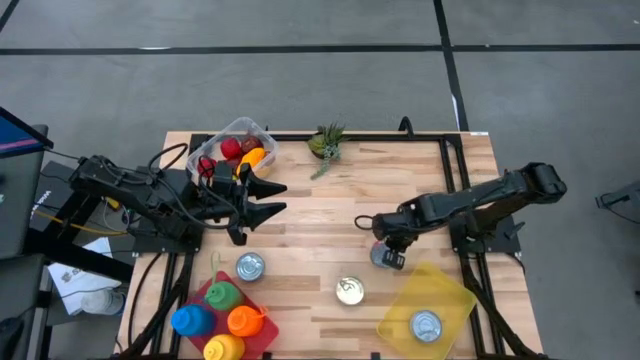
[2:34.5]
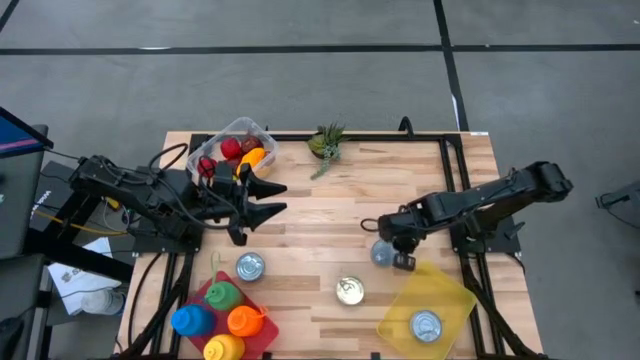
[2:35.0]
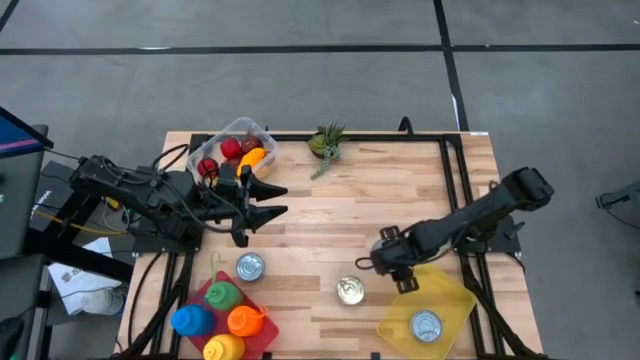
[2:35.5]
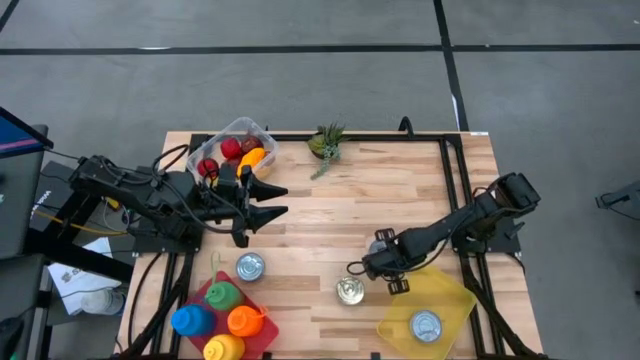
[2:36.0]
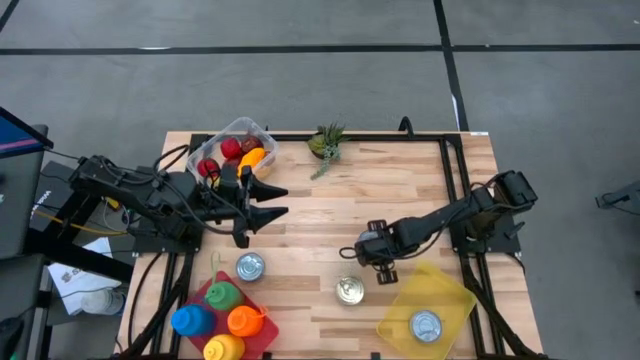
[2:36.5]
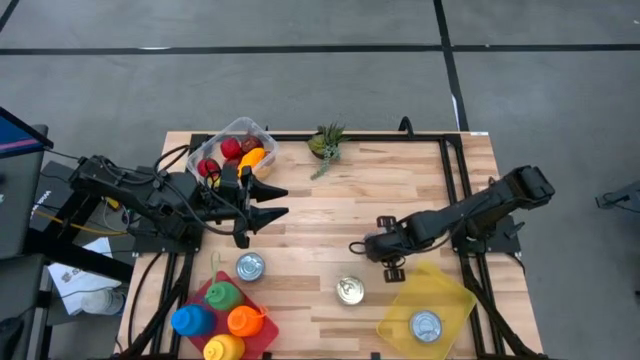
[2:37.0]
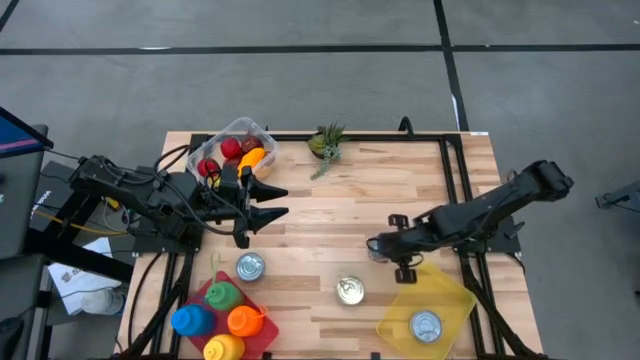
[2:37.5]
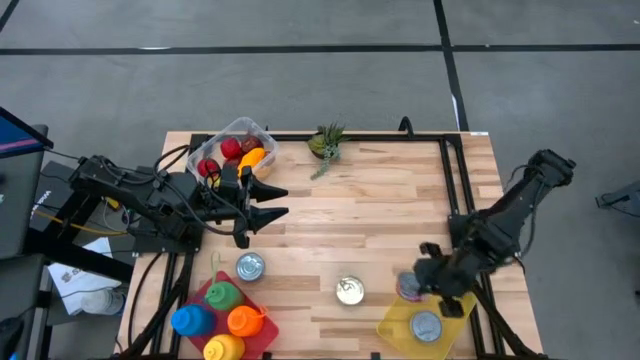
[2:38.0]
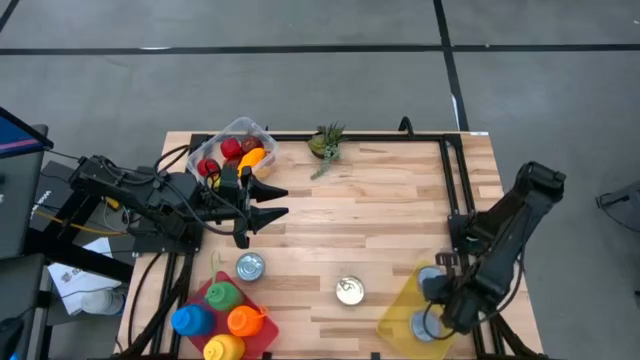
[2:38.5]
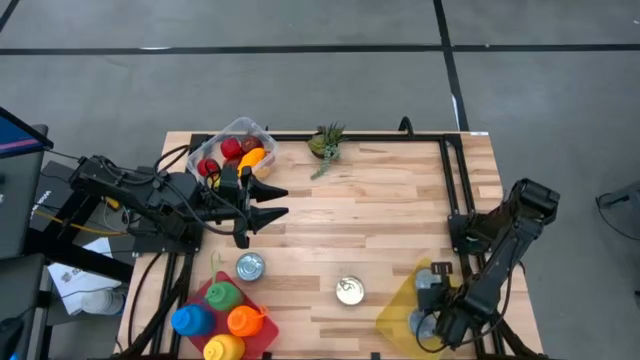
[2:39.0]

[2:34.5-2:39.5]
Task: Pick & Place Food Item
Put the red tuna can into the yellow bin

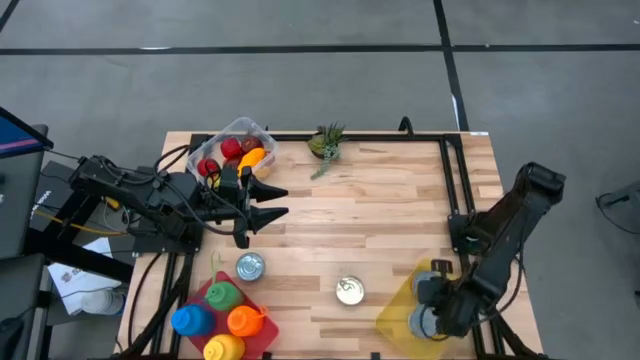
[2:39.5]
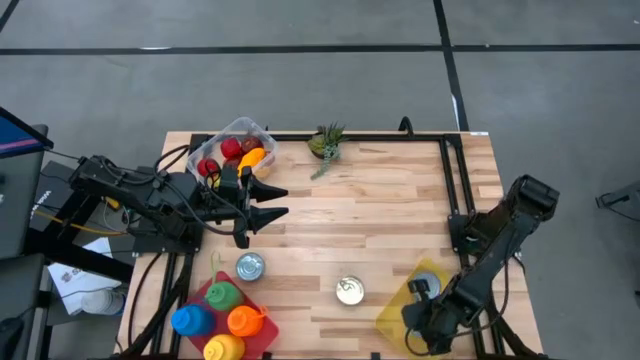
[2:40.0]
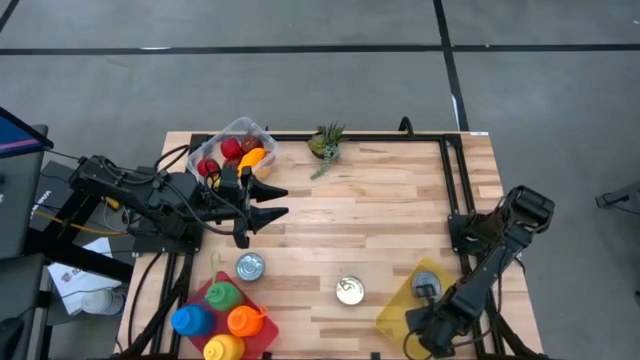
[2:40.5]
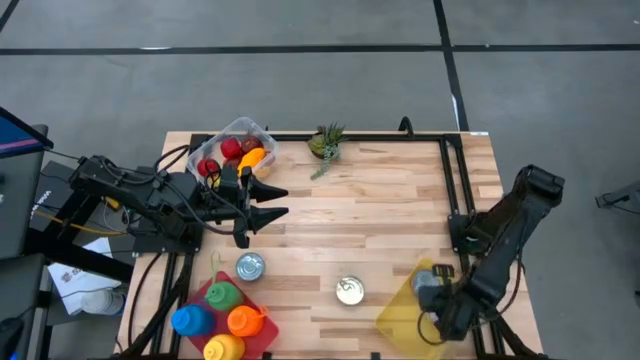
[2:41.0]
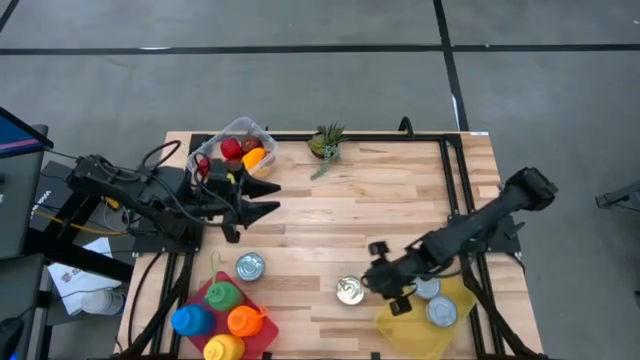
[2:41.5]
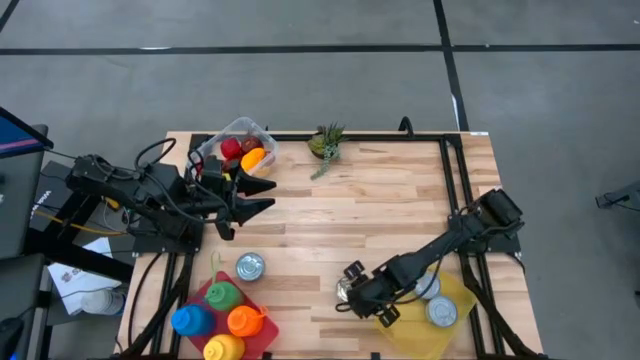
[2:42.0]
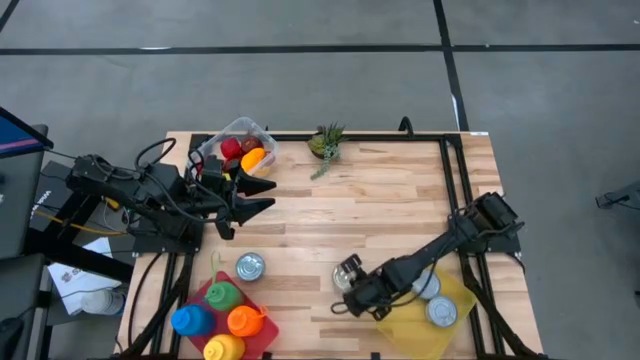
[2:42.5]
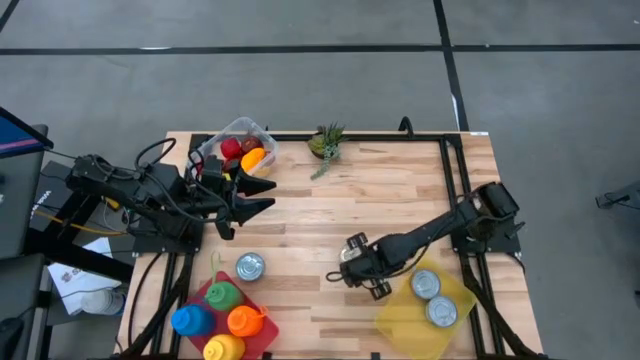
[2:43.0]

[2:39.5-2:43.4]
Put the blue pink tuna can into the yellow bin

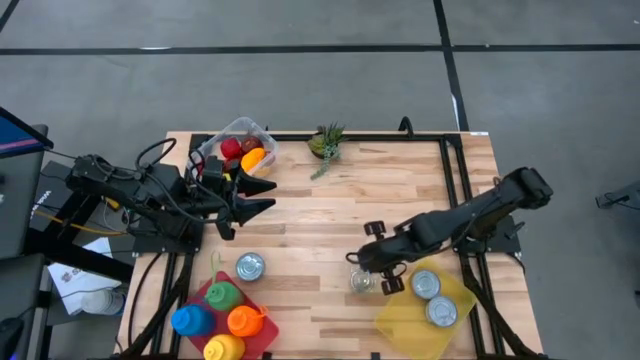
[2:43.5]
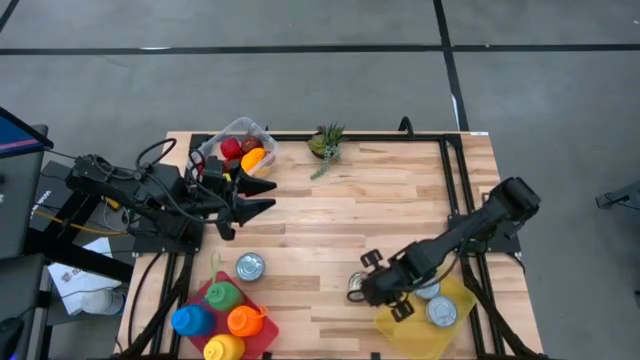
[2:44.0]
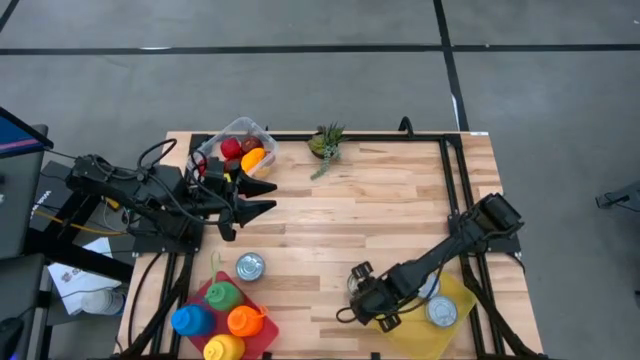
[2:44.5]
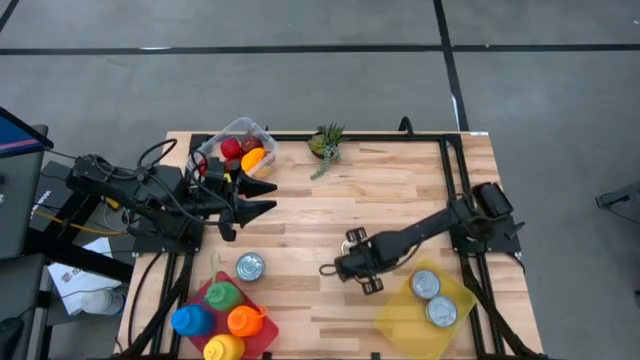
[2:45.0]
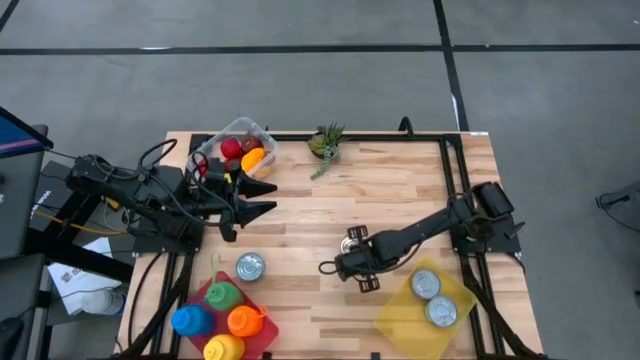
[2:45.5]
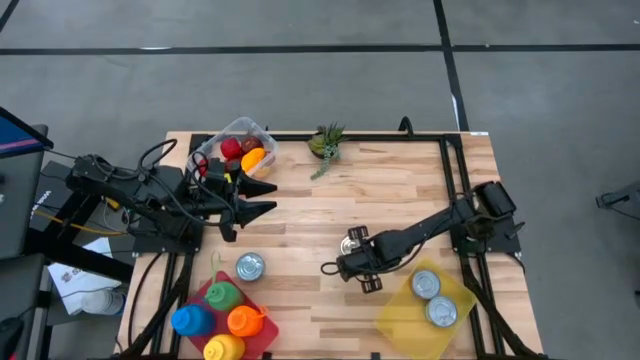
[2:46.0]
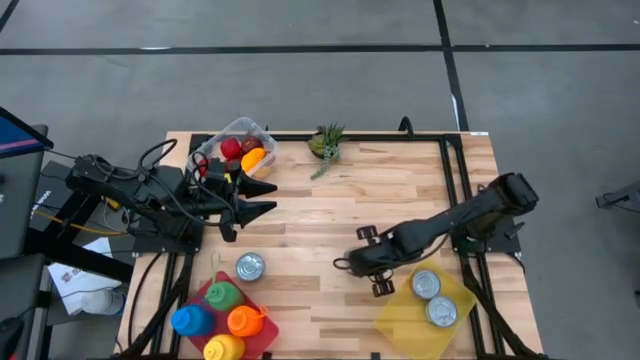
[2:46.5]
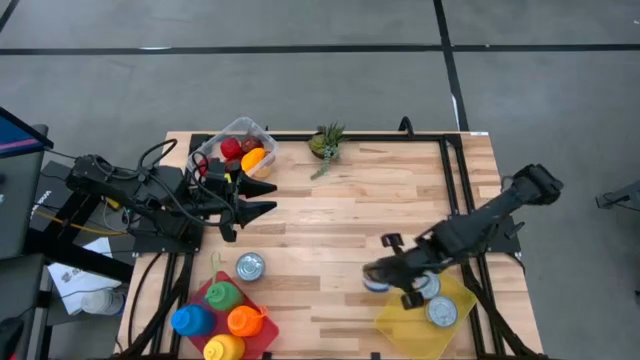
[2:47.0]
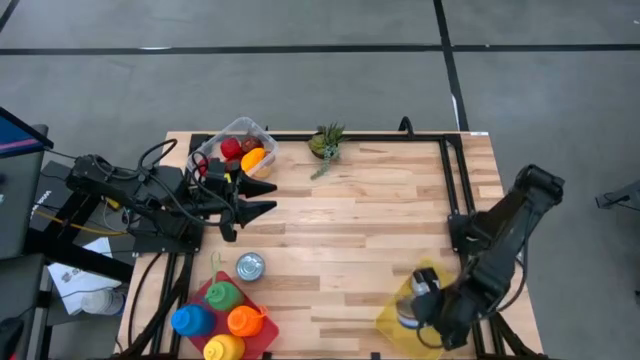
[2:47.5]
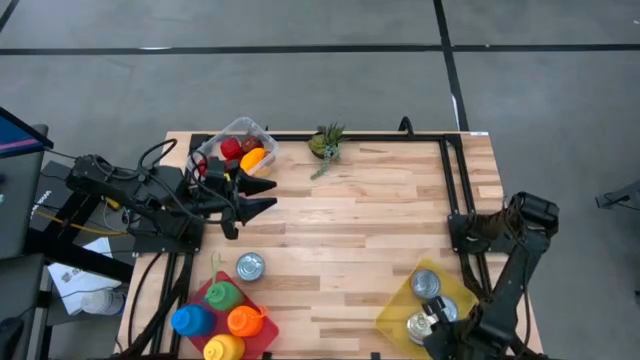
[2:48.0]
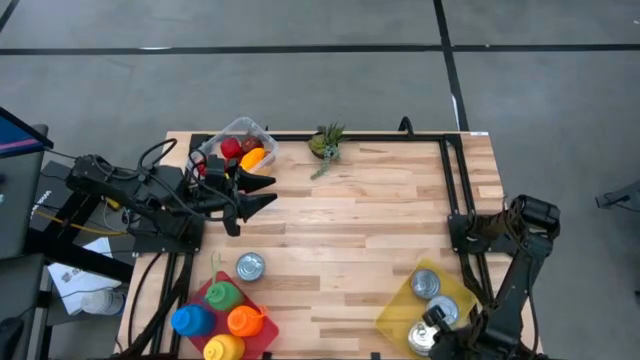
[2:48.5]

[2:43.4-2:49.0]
Put the blue pink tuna can into the yellow bin

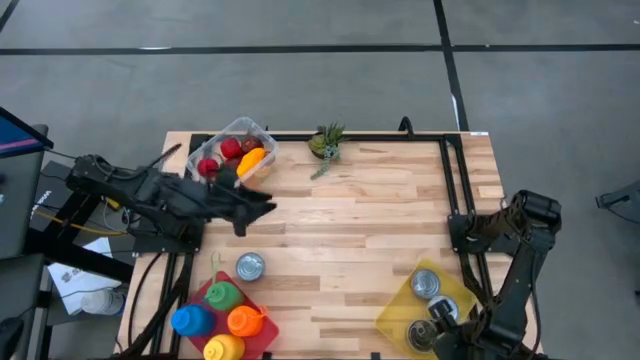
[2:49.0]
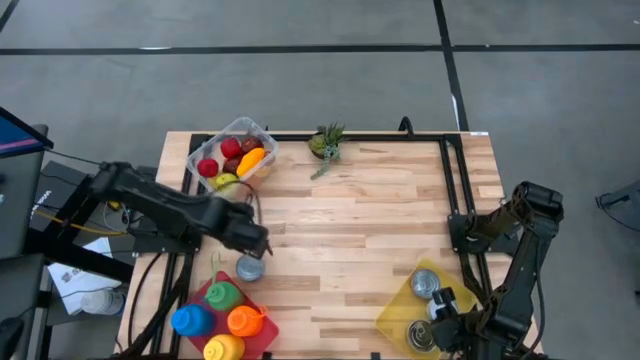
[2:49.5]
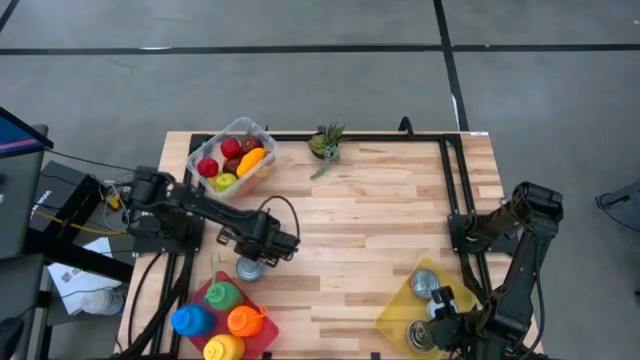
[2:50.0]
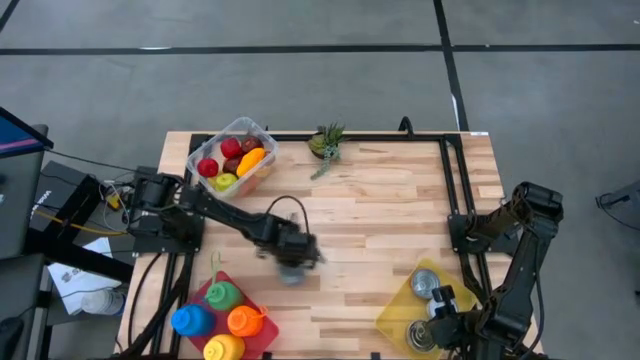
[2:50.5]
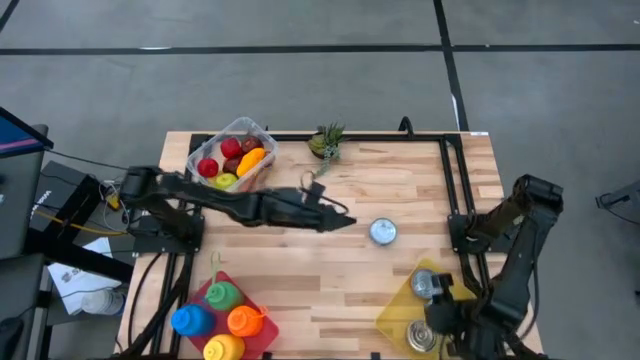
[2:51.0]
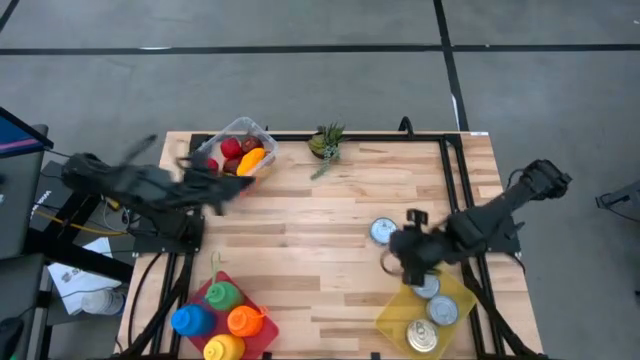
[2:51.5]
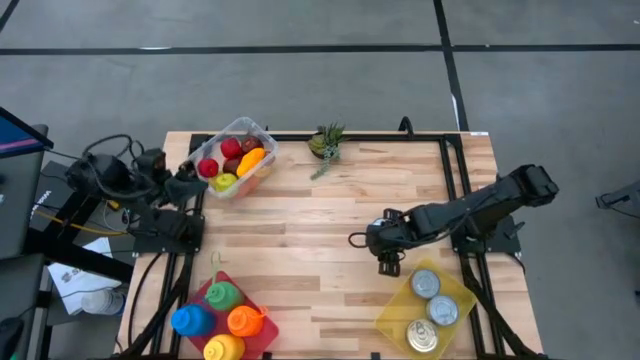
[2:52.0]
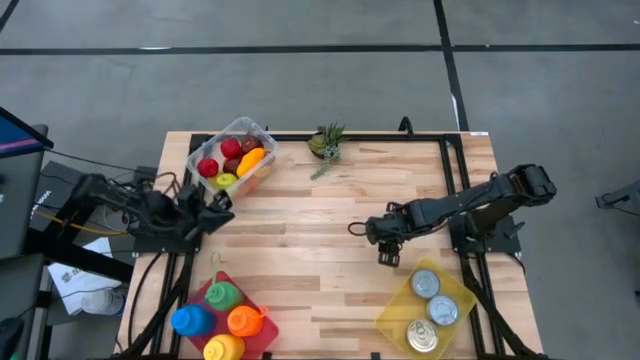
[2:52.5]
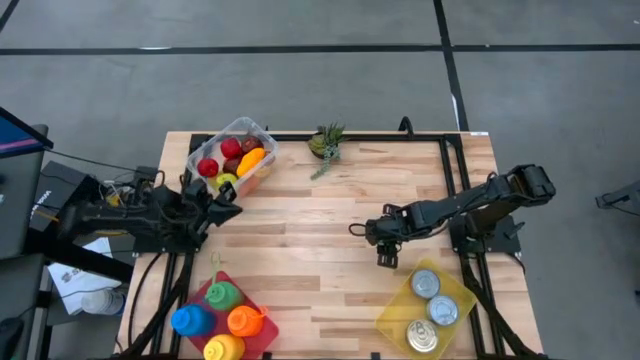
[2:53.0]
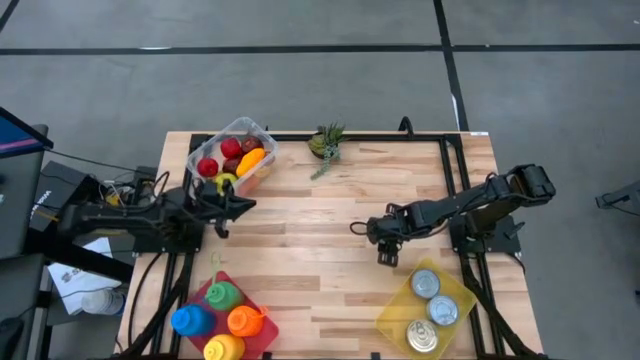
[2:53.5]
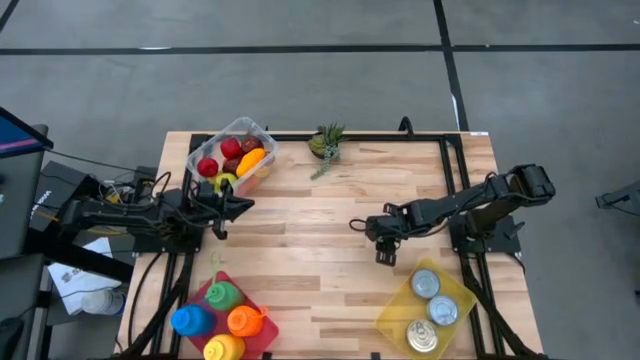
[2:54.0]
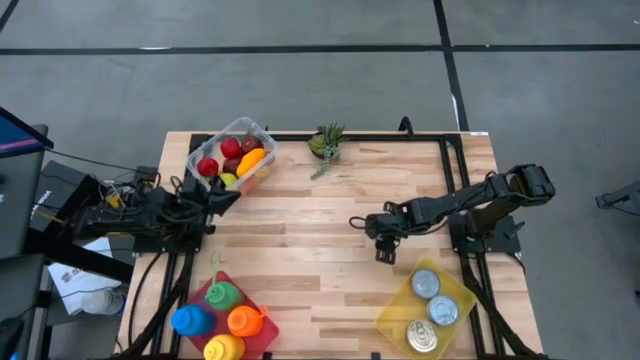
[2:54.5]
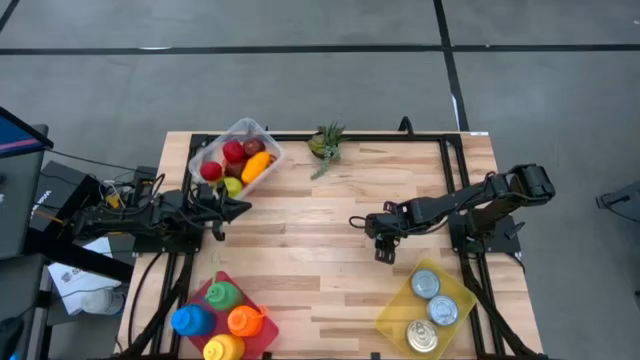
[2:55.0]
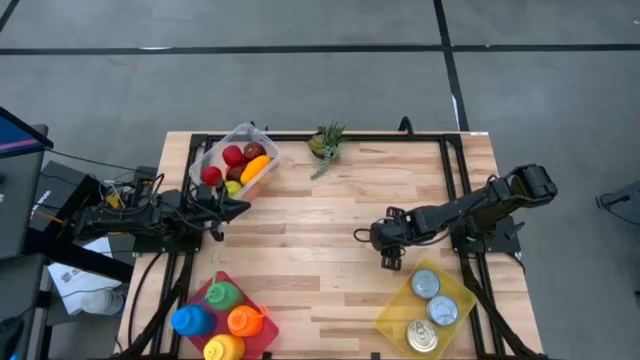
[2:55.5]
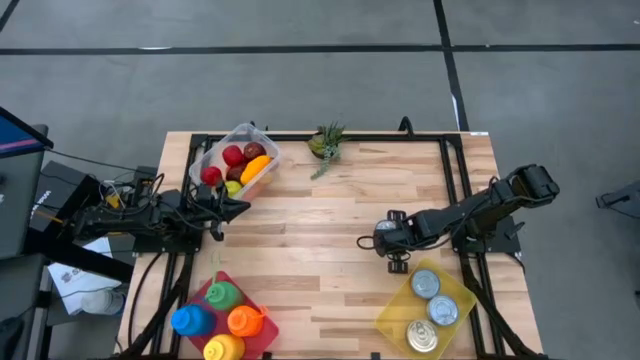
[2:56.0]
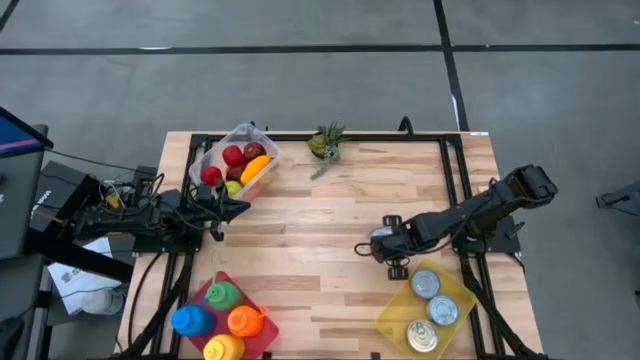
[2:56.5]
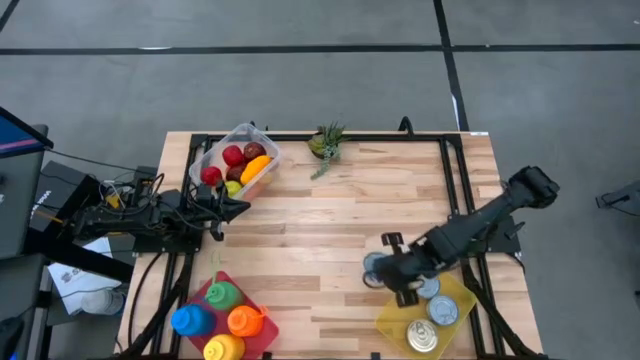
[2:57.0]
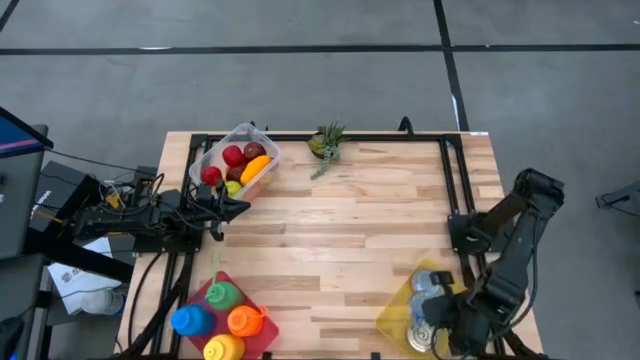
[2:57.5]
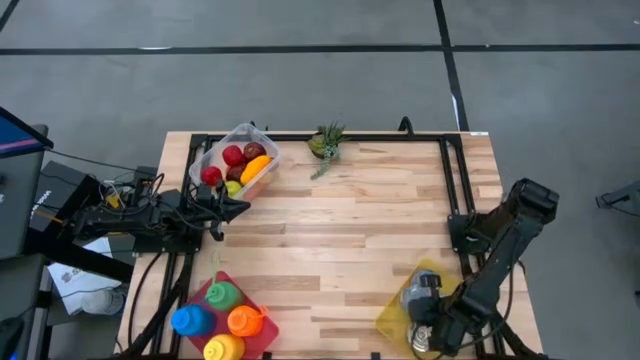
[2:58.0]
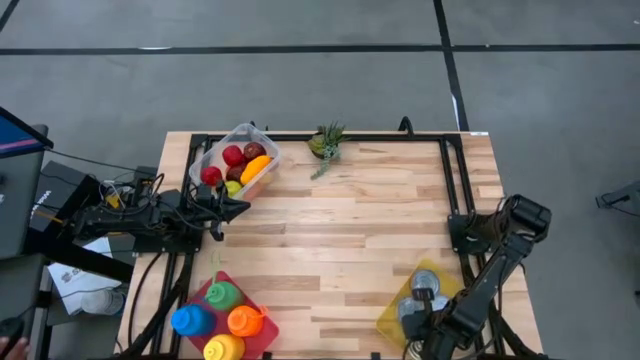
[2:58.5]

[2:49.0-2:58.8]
Put the blue tuna can into the yellow bin
